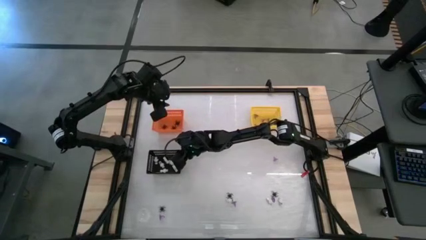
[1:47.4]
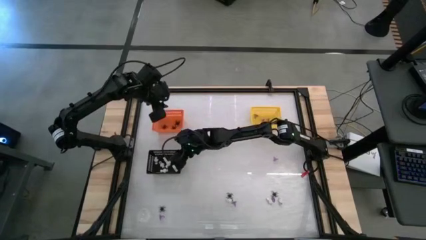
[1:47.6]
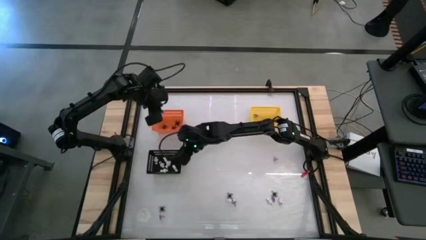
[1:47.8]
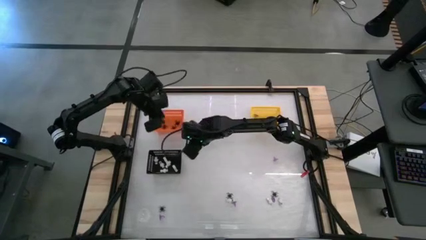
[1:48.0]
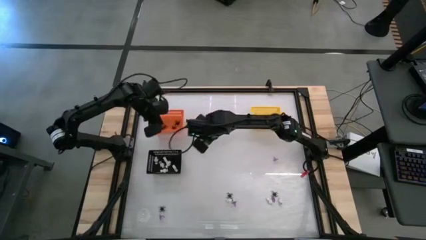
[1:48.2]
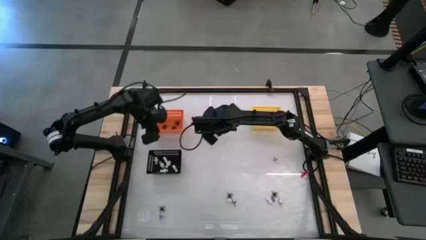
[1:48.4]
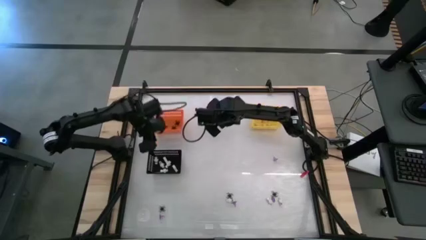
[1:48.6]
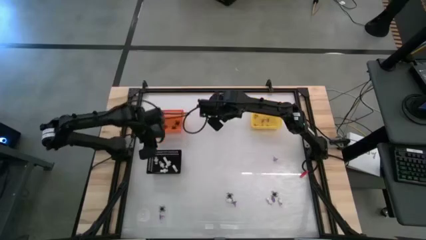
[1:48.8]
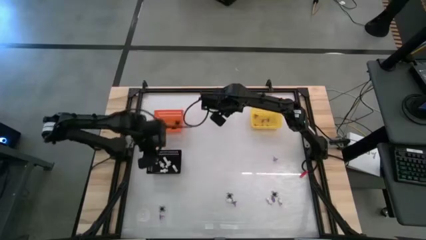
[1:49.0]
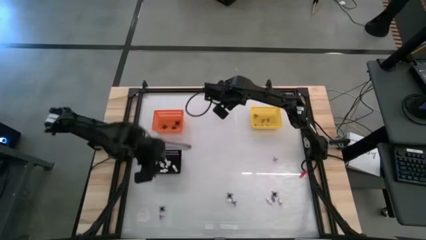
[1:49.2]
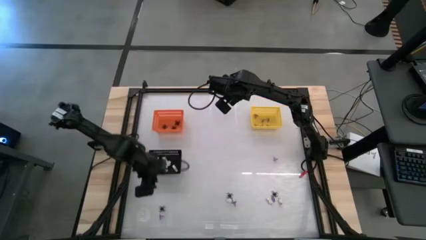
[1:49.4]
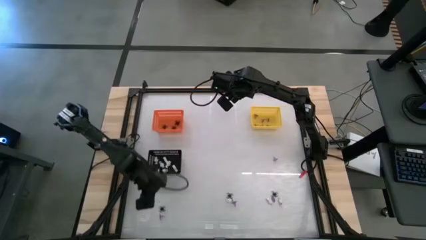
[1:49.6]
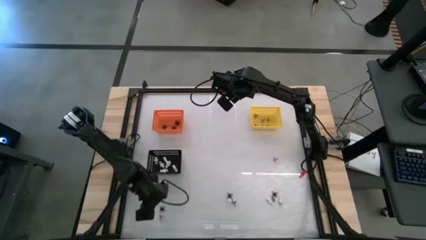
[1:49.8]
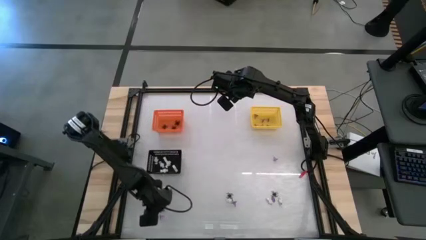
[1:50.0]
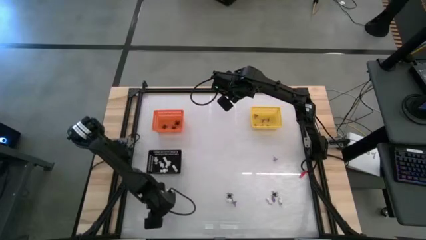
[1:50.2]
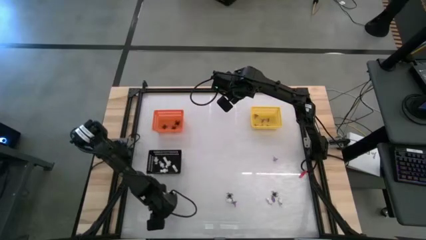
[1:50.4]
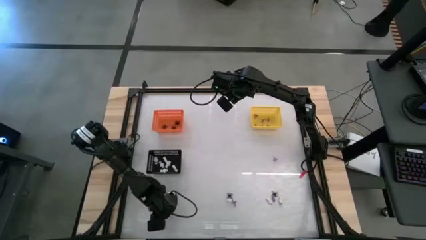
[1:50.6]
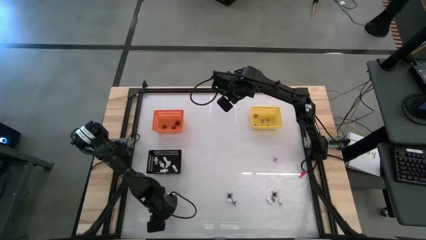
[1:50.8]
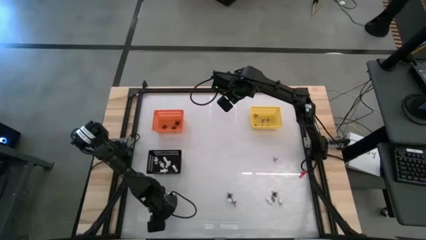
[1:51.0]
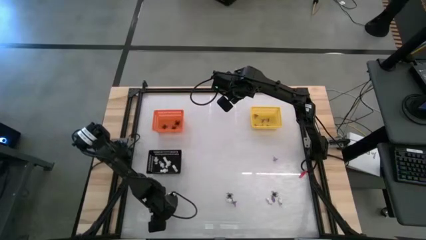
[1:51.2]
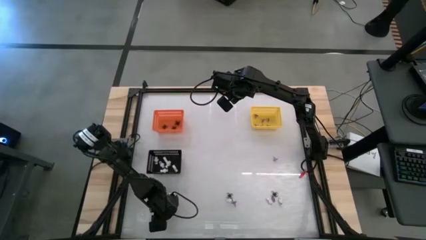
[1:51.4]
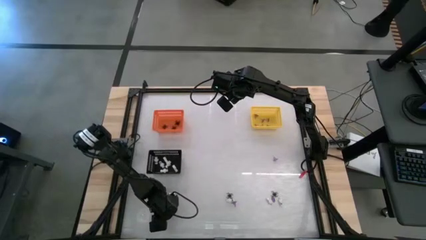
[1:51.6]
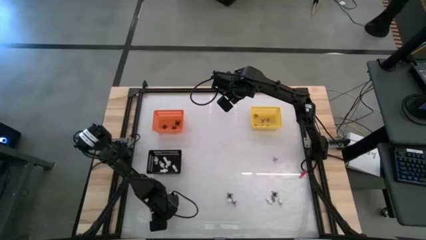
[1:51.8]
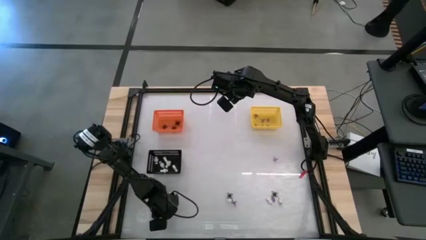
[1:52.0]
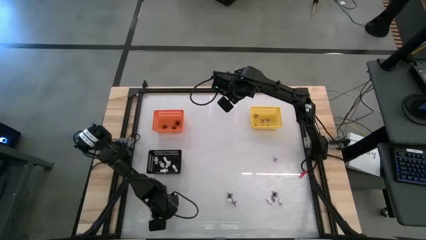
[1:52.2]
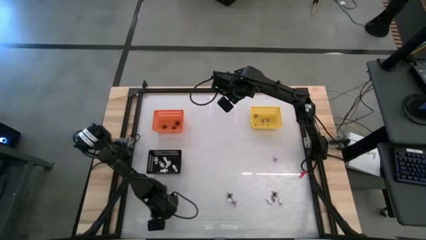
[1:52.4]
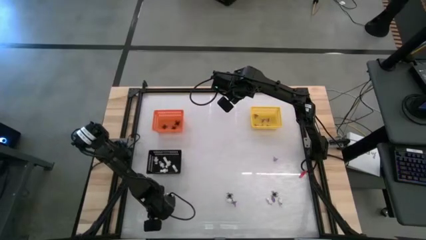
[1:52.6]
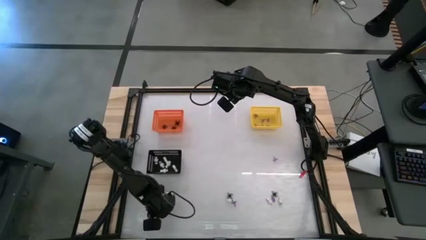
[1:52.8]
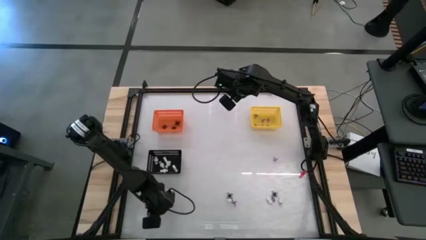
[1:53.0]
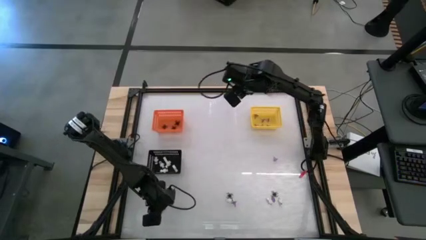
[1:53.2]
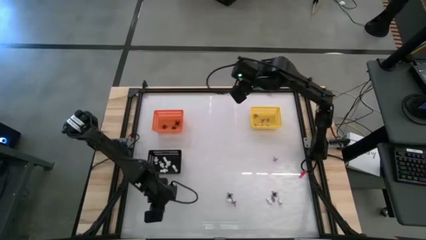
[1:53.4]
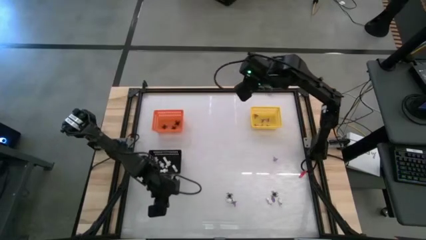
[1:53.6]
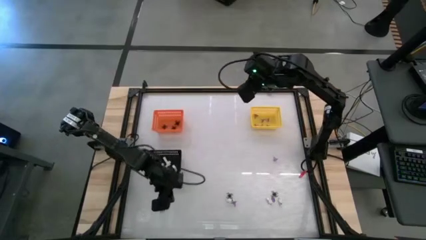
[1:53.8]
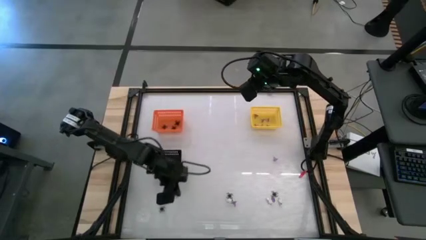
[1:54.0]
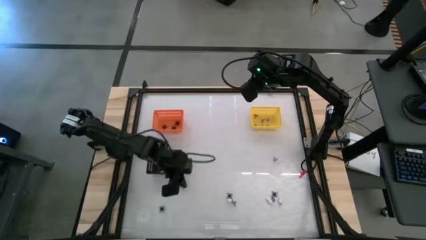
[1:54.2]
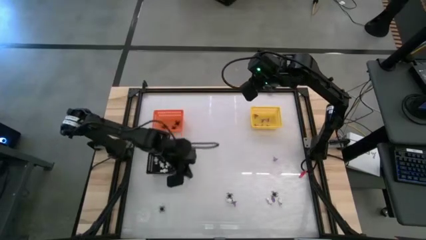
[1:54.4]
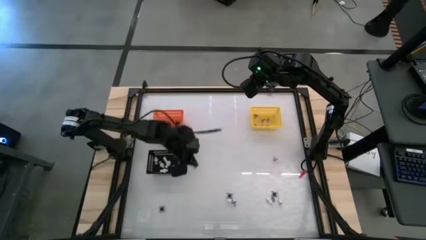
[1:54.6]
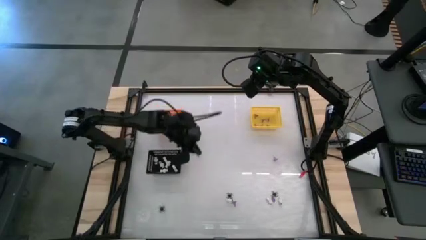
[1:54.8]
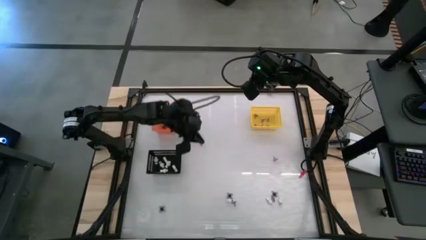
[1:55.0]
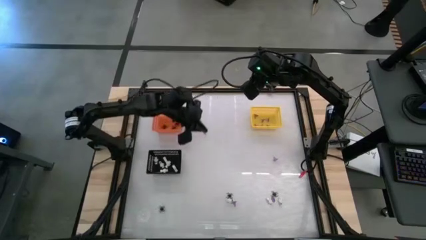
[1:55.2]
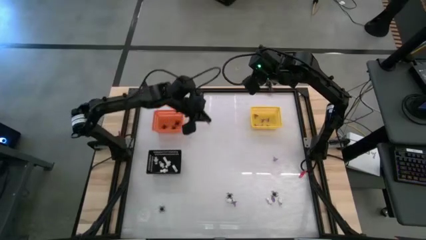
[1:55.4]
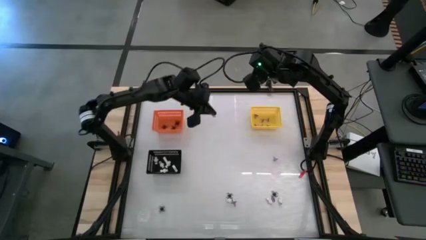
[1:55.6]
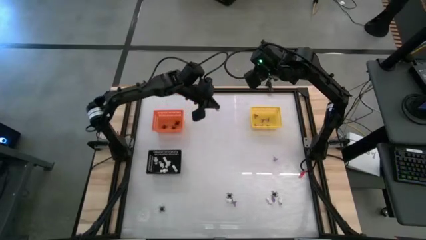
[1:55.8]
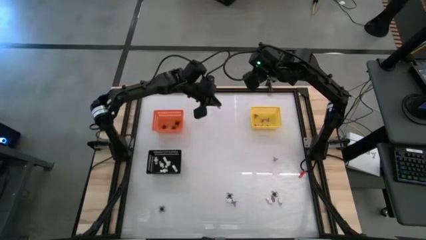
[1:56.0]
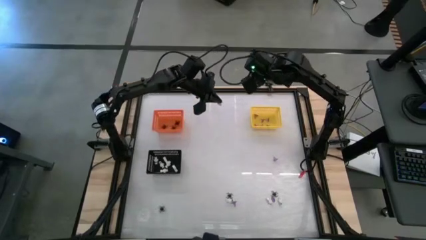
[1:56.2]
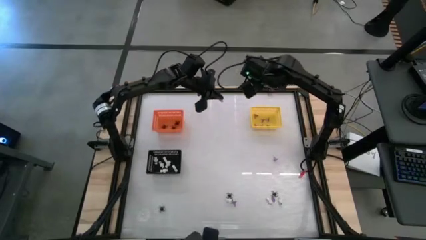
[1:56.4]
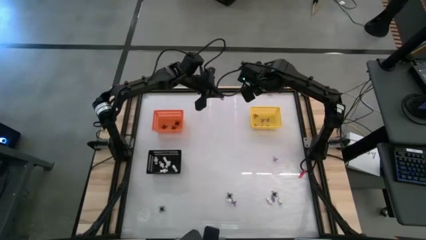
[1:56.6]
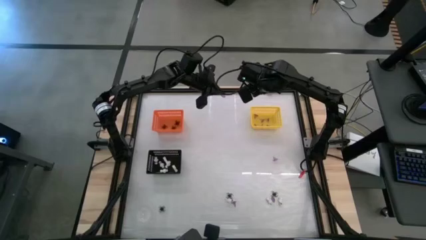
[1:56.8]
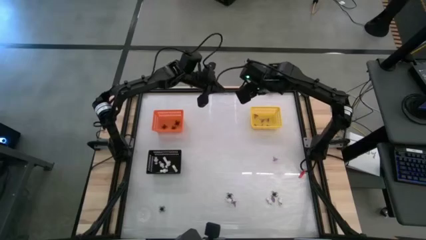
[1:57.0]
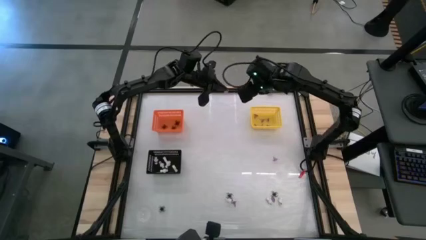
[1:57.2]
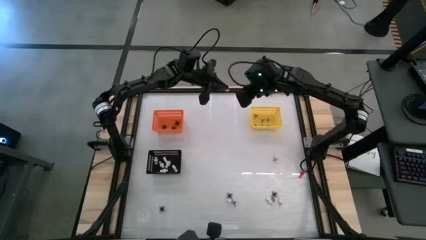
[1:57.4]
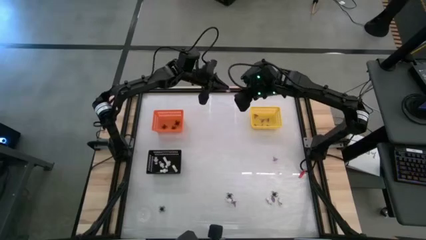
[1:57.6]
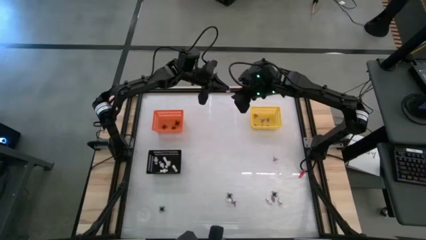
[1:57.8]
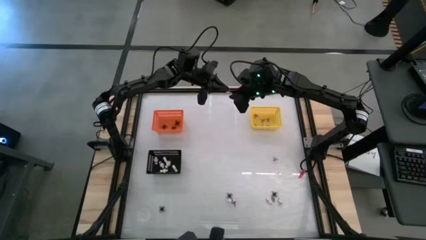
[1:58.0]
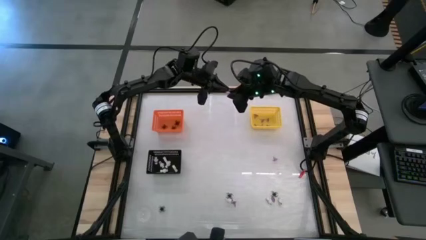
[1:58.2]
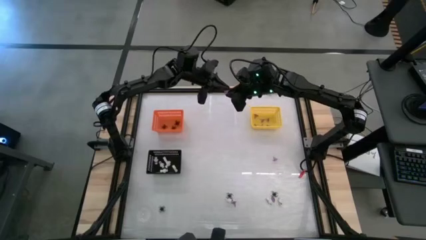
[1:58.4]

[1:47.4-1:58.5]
Task: Sort Halloween decoration
Put the violet witch hat into the yellow bin

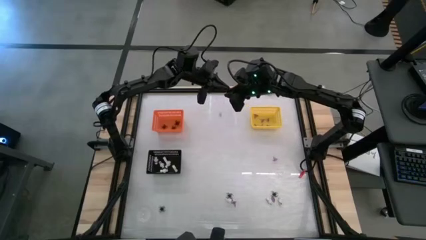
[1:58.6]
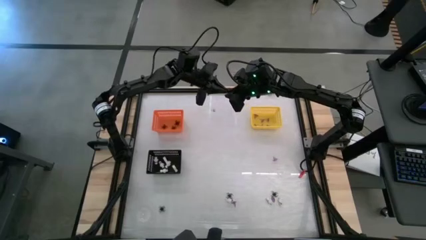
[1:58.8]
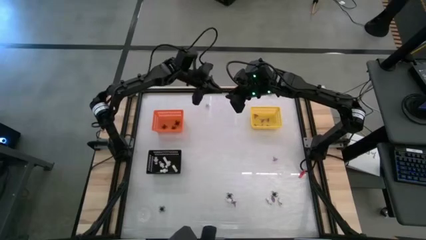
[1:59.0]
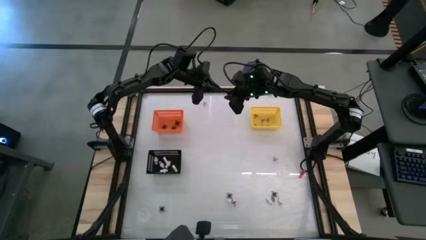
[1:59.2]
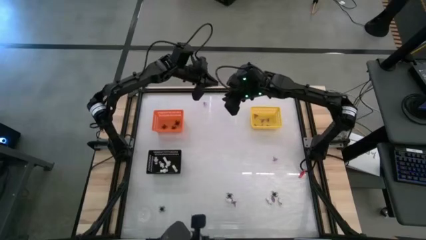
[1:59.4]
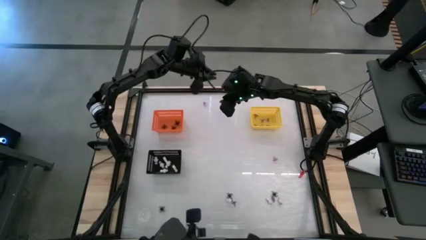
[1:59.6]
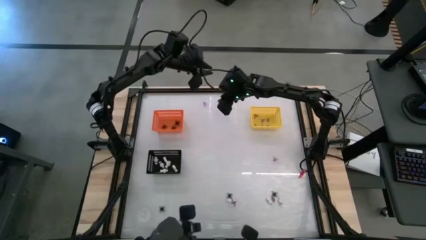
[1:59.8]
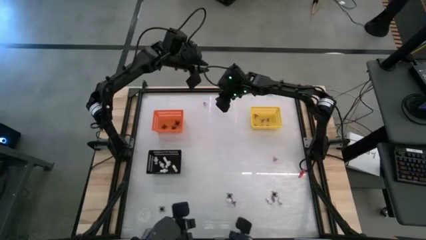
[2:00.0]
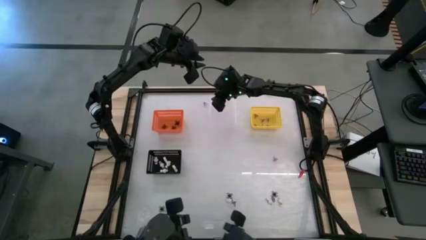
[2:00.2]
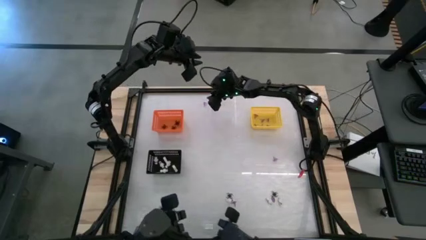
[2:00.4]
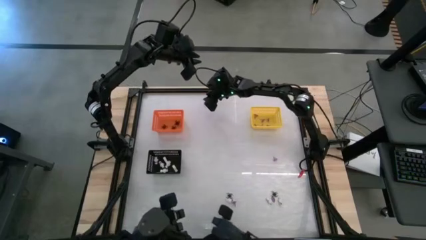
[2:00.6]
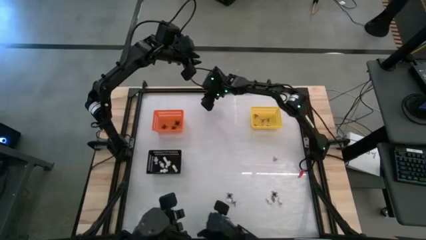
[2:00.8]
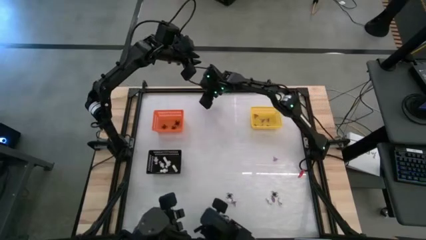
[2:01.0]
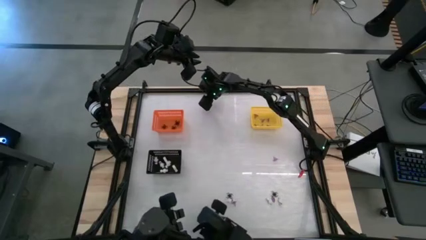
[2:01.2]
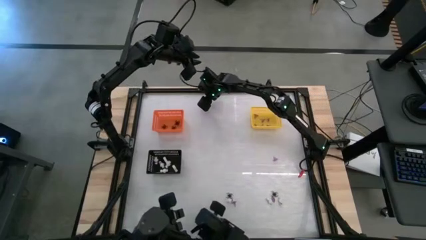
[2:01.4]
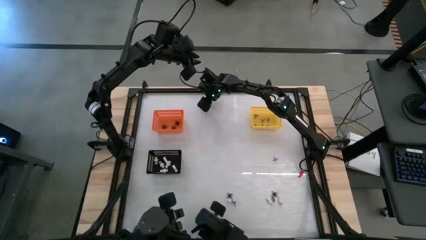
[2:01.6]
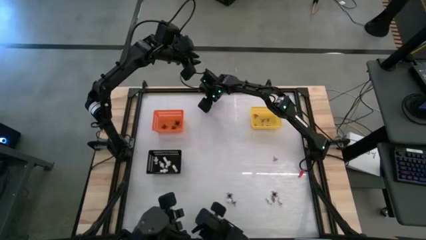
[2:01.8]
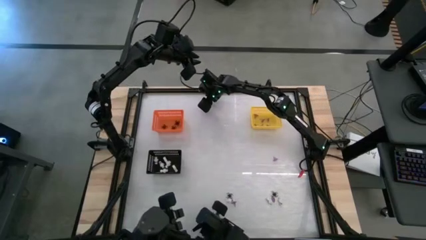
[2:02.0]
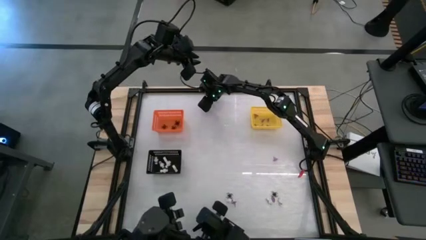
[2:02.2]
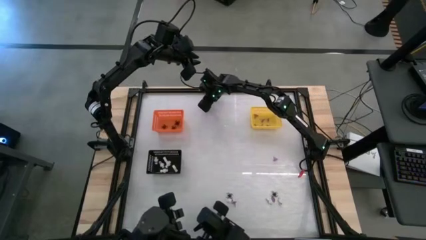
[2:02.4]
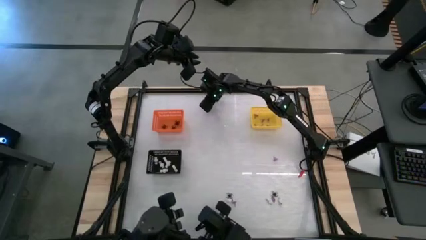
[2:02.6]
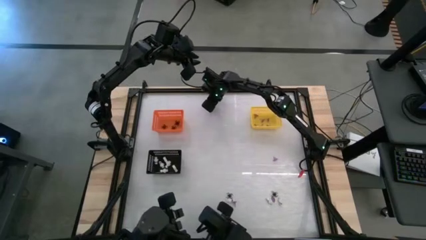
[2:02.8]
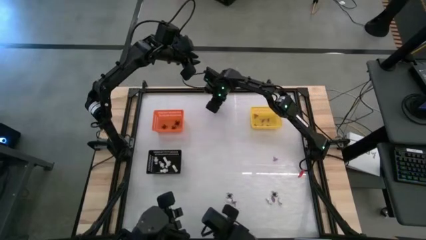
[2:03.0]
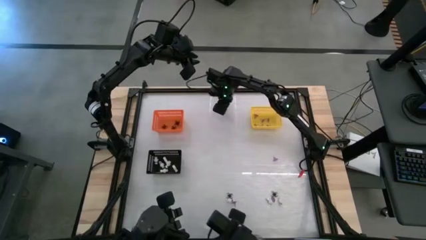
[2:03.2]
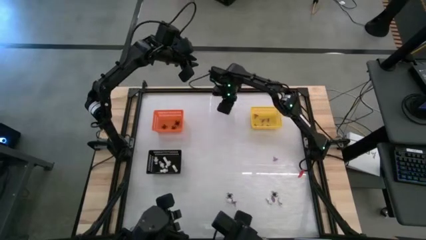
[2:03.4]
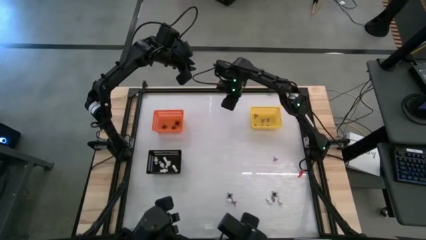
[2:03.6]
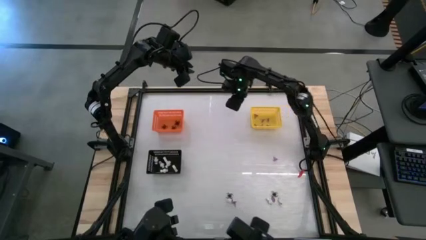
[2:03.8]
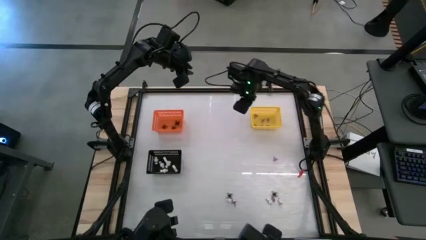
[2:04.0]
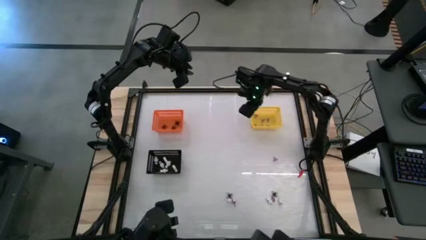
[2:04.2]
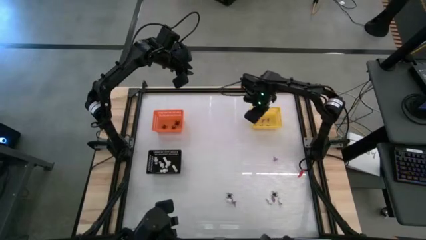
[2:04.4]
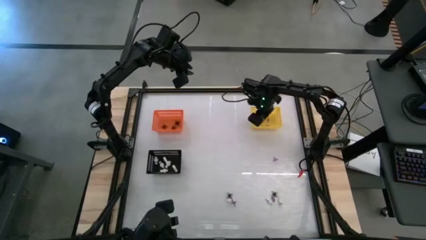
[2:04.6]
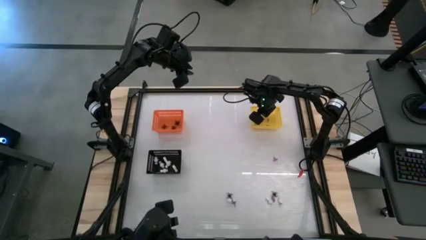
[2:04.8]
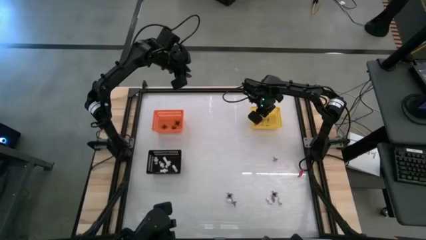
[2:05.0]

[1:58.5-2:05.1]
Put the violet witch hat into the yellow bin
